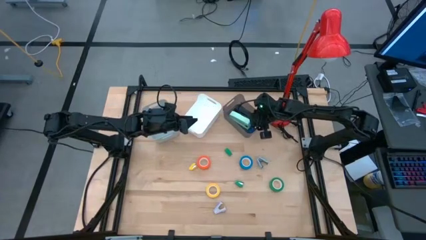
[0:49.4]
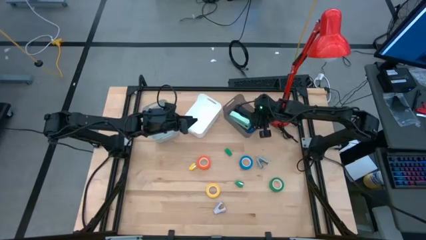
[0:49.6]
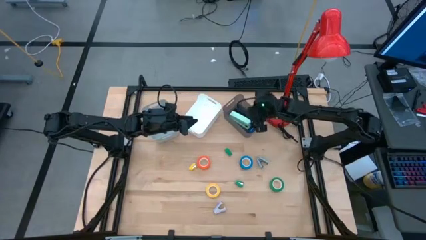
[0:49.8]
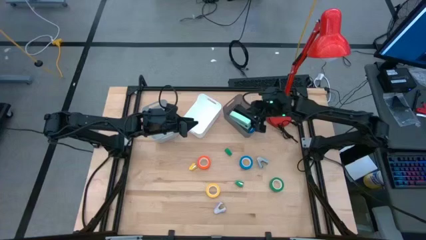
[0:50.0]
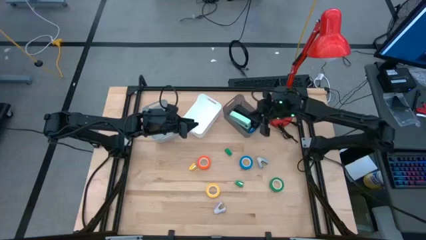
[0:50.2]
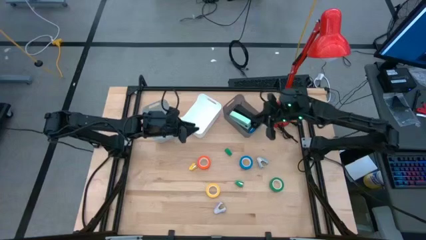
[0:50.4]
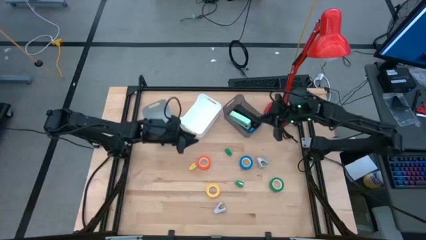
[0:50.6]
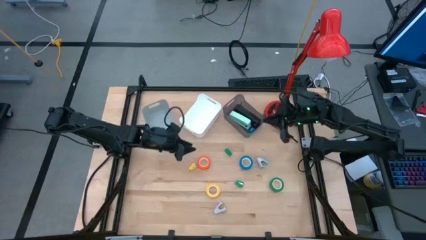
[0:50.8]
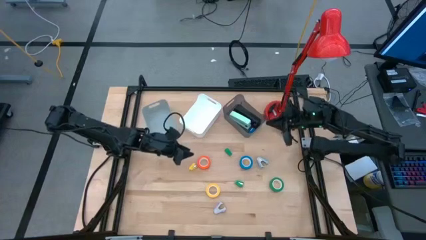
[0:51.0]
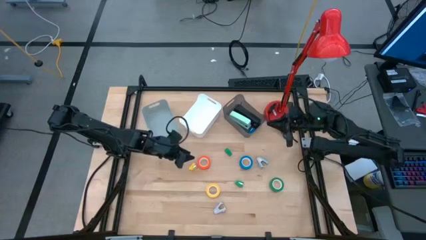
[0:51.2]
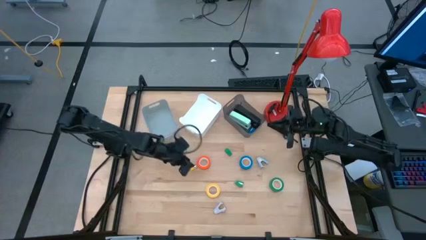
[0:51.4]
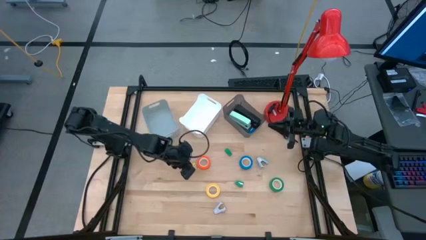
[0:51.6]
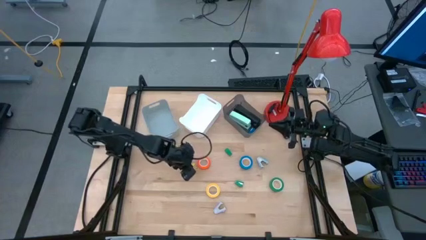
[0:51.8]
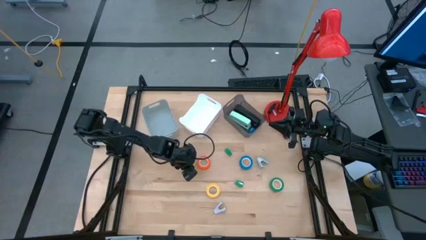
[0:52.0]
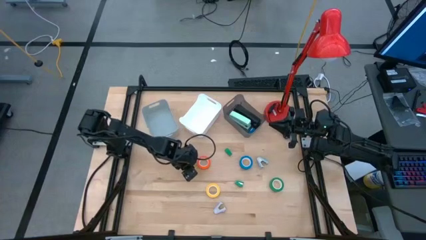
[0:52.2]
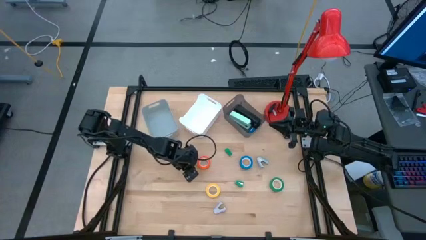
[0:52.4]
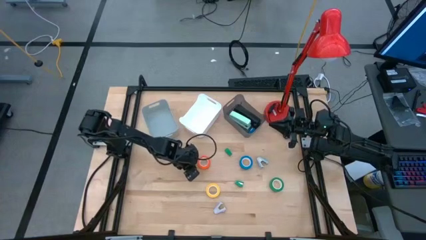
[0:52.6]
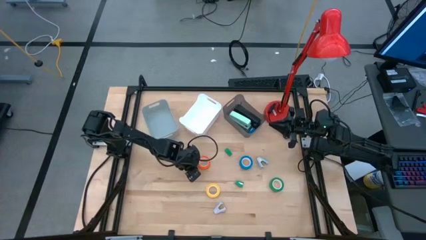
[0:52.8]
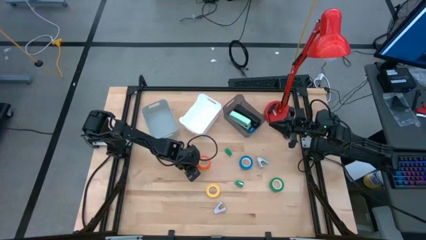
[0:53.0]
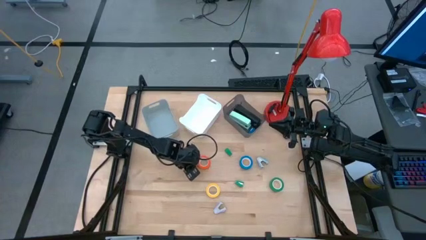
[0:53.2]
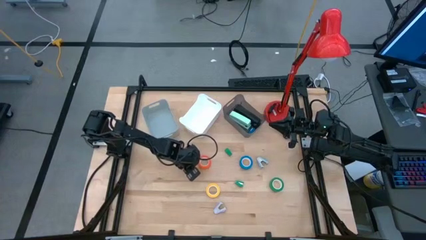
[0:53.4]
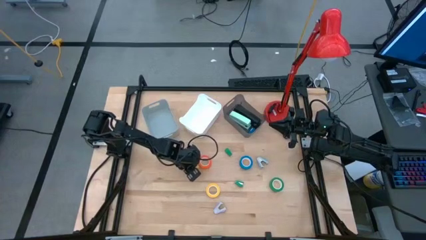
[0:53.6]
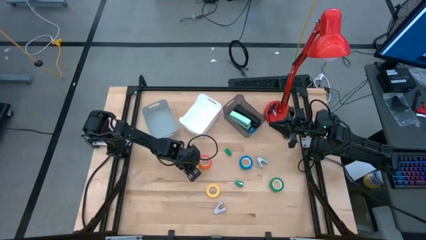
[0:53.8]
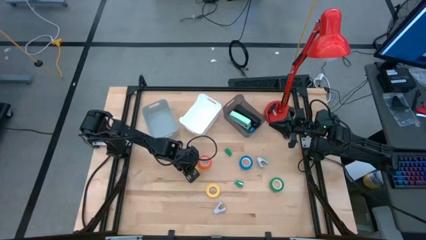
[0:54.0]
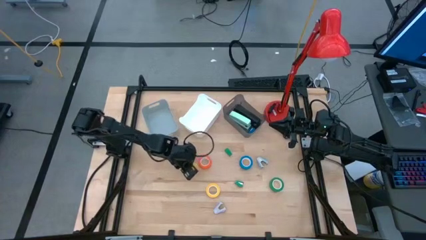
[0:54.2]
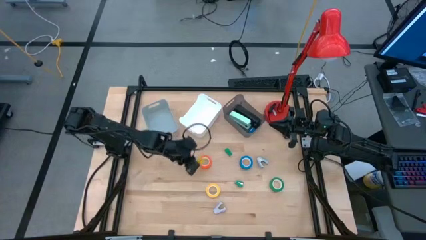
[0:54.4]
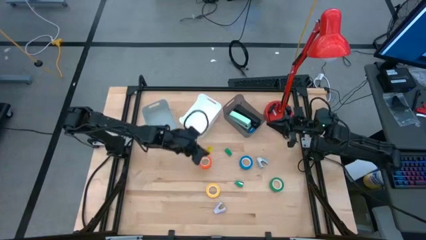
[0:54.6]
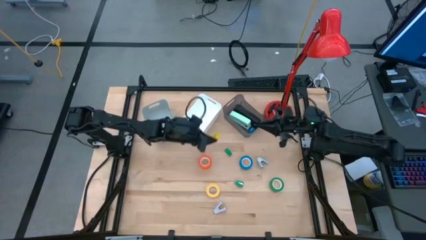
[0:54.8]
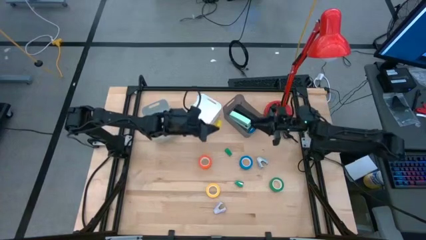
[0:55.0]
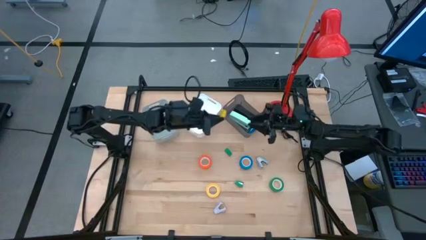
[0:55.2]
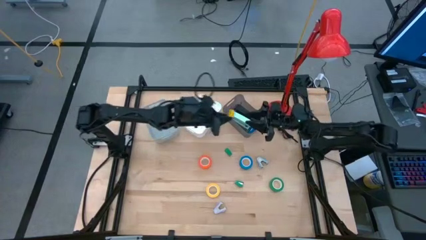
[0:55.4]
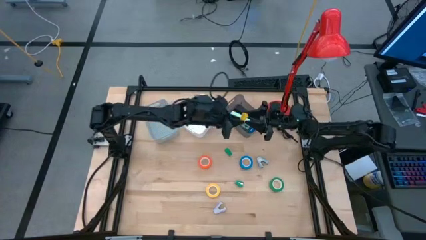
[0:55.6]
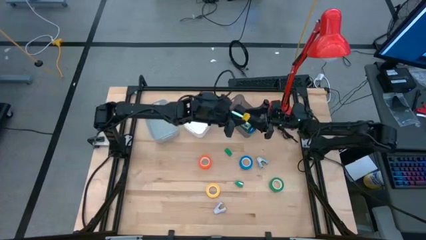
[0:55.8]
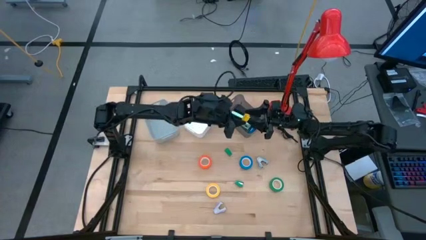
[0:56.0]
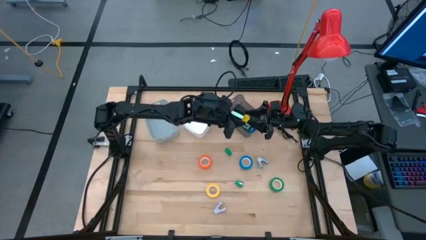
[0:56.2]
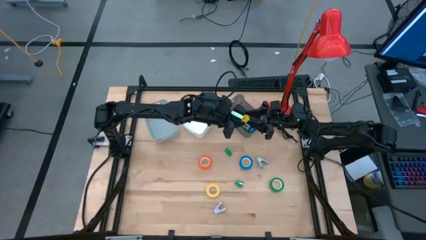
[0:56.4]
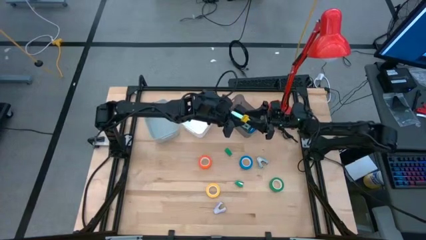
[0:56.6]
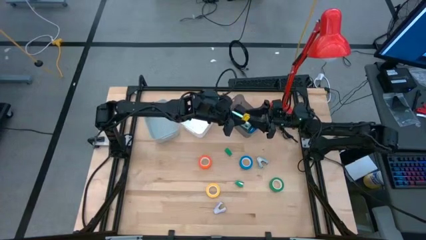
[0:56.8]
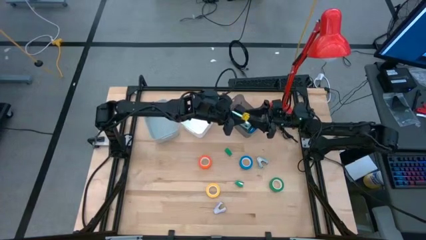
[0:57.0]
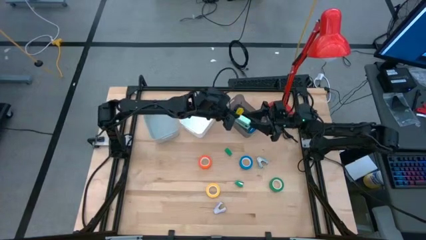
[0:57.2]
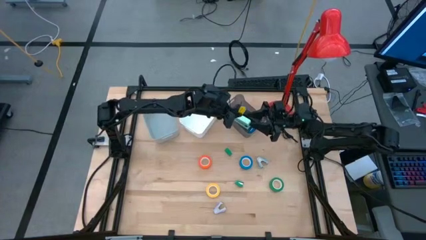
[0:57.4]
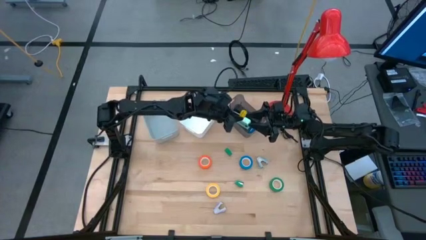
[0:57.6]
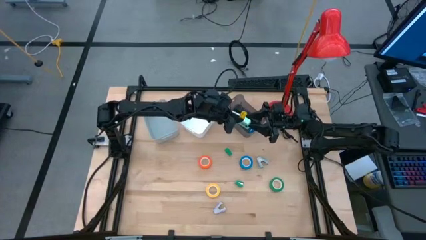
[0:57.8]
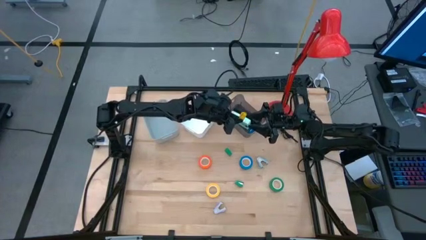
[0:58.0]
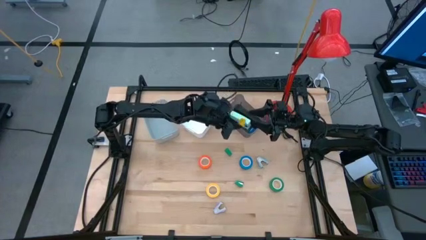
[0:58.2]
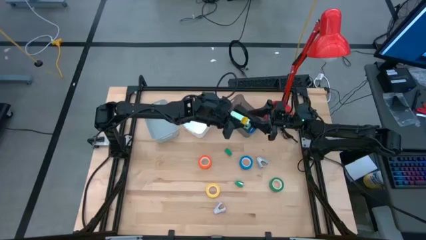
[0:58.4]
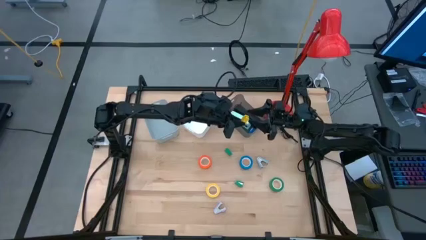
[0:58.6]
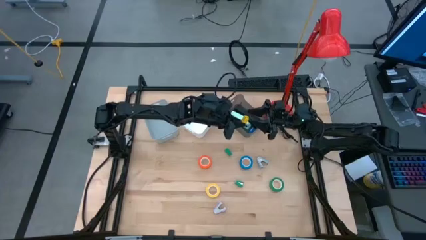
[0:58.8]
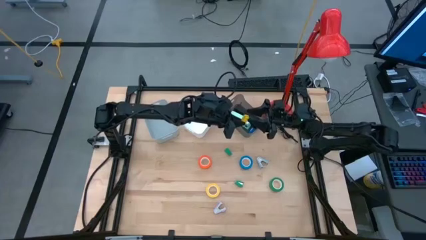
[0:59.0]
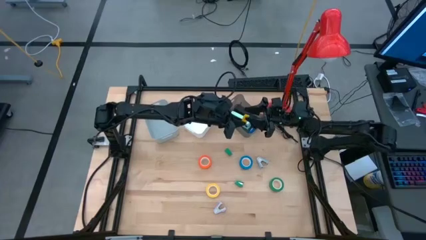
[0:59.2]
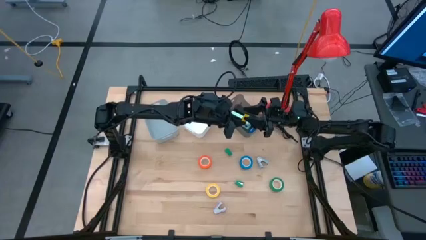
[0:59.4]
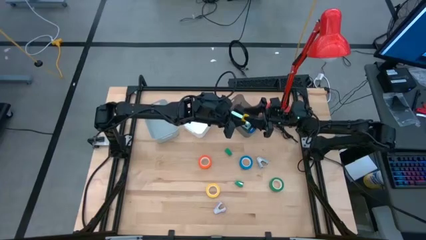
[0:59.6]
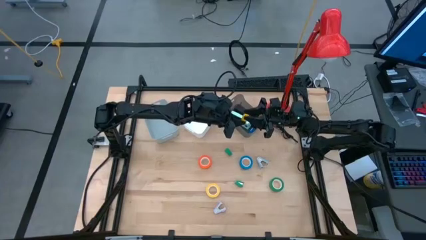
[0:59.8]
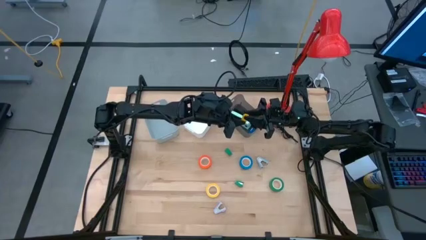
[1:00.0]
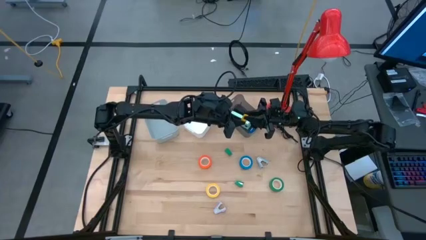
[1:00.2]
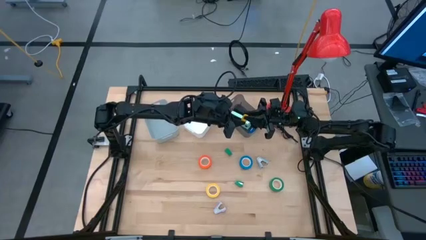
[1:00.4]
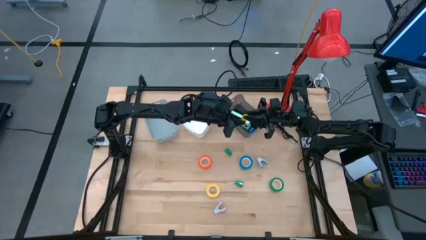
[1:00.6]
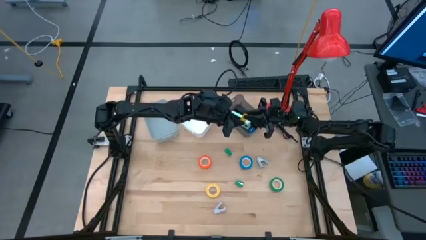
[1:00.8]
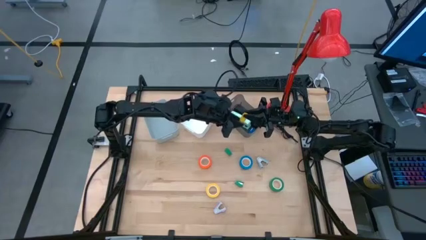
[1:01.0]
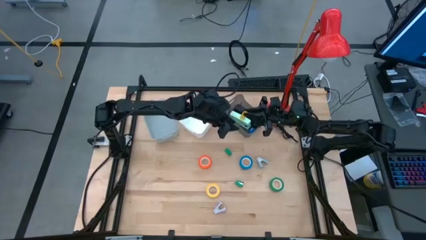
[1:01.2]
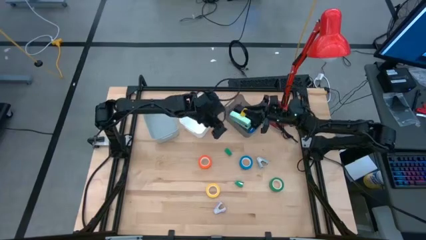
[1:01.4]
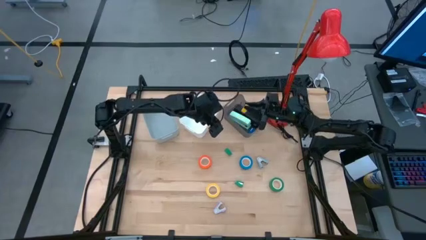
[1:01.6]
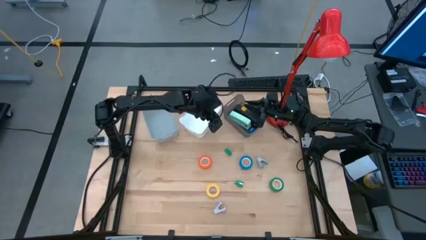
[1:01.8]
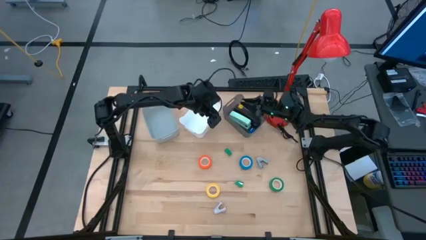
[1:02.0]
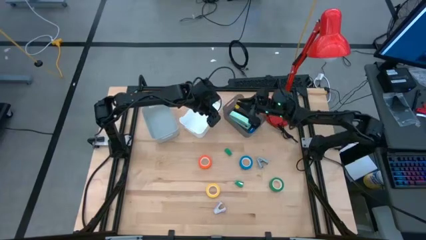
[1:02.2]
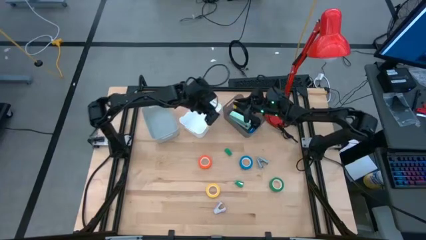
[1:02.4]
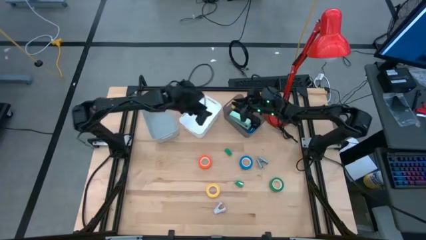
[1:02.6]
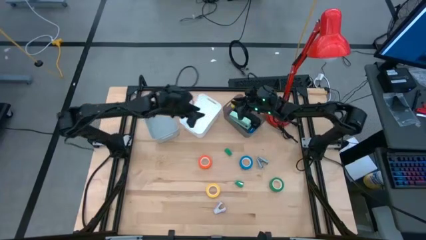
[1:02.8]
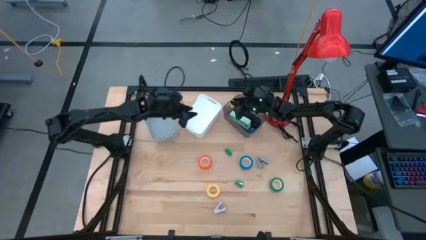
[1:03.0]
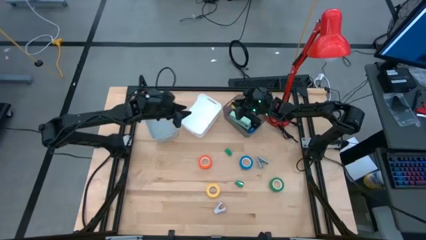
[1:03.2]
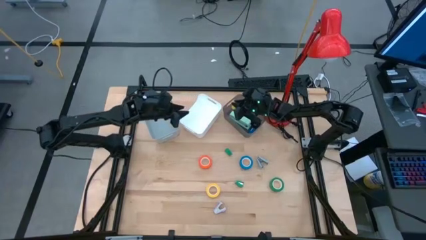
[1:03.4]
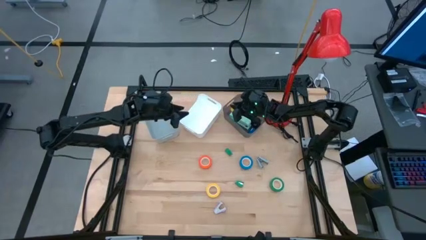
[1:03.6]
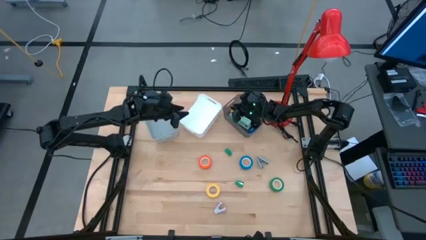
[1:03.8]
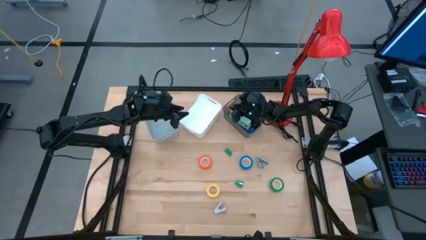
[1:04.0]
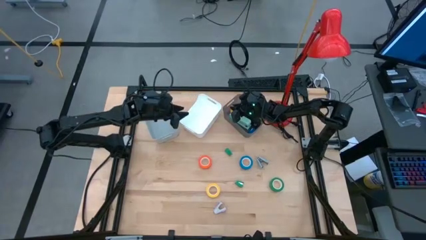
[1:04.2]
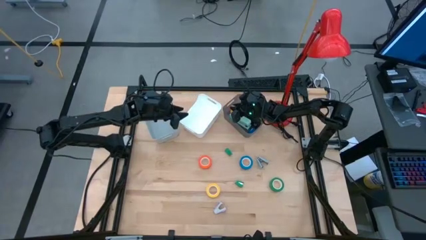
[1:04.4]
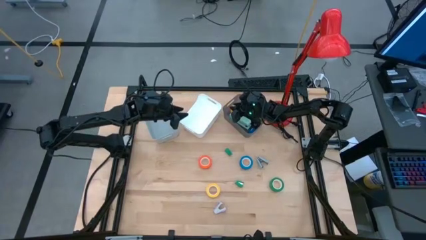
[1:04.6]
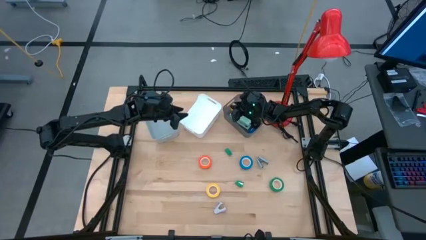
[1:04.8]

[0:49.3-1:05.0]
Task: Pick and place Stapler, Stapler remover, tape
Put the yellow stapler into the black bin
